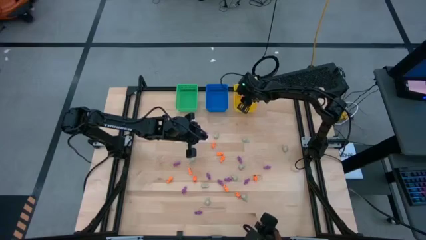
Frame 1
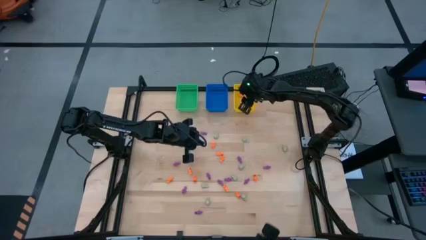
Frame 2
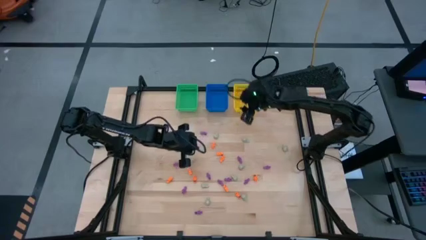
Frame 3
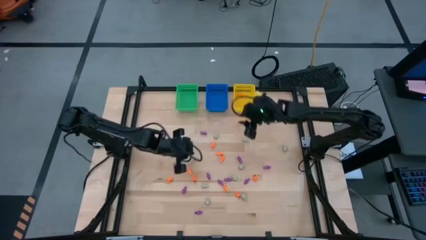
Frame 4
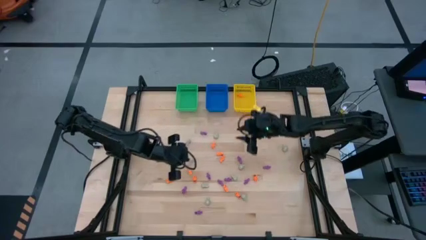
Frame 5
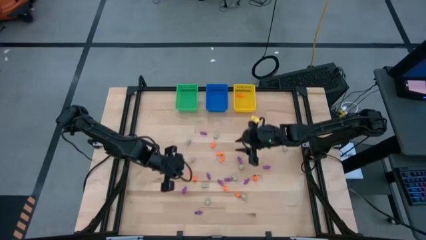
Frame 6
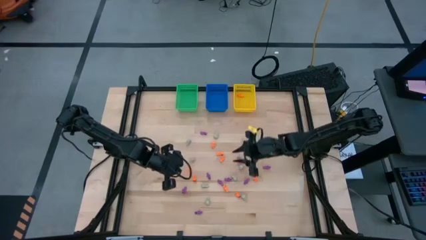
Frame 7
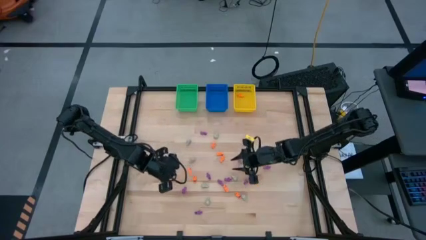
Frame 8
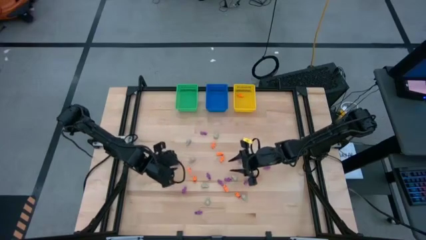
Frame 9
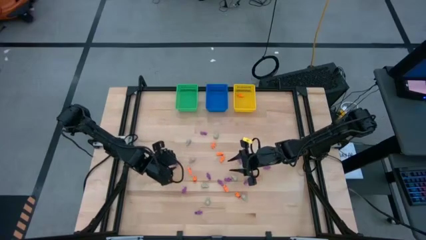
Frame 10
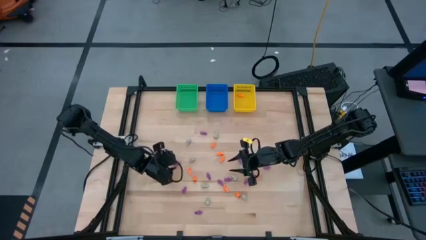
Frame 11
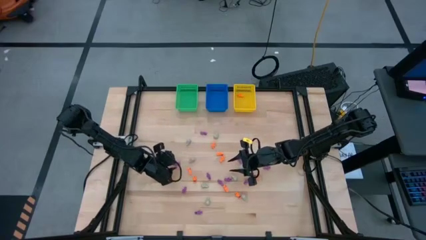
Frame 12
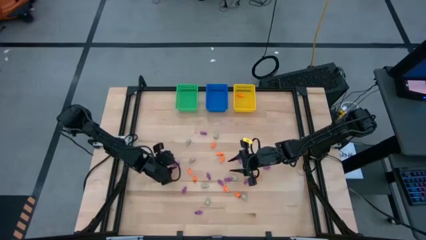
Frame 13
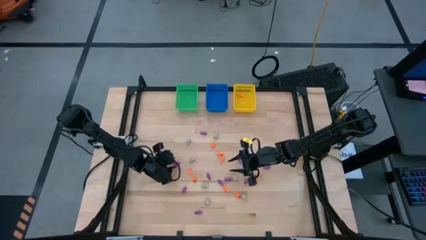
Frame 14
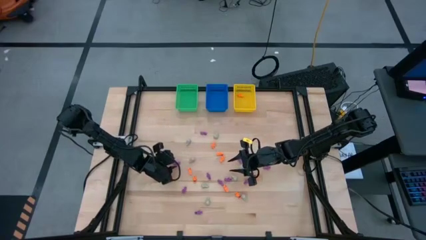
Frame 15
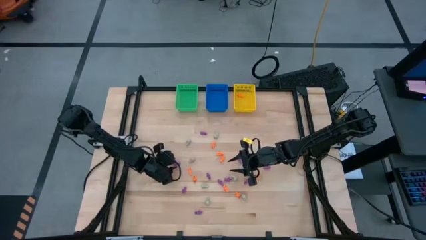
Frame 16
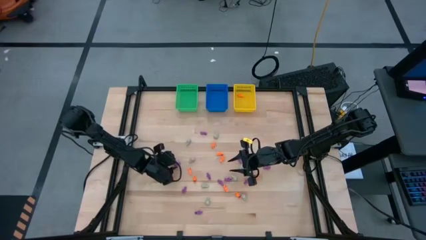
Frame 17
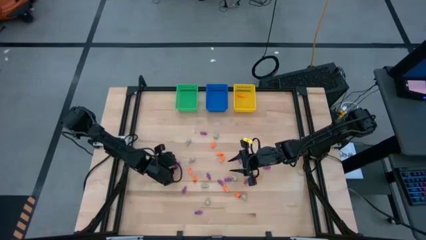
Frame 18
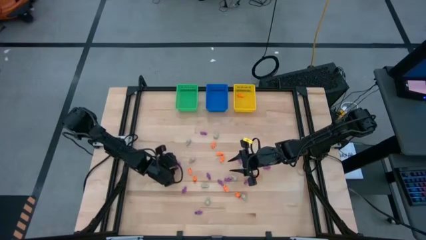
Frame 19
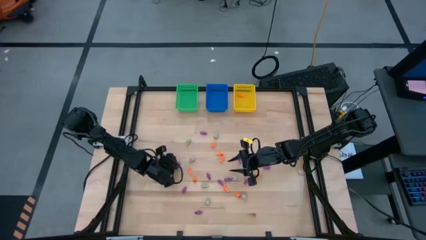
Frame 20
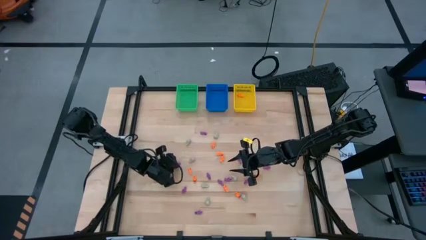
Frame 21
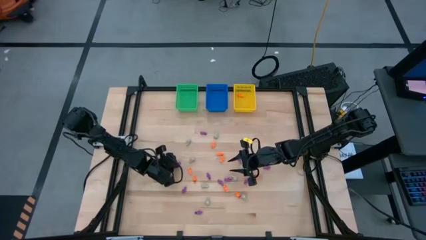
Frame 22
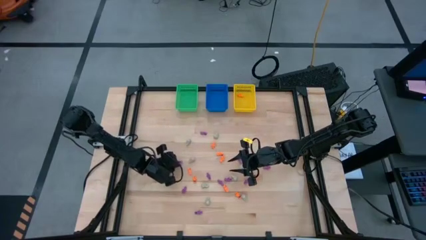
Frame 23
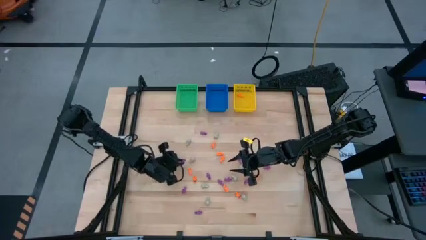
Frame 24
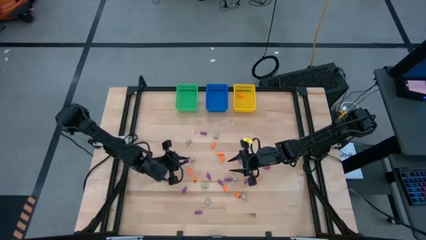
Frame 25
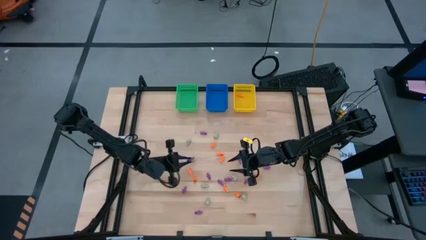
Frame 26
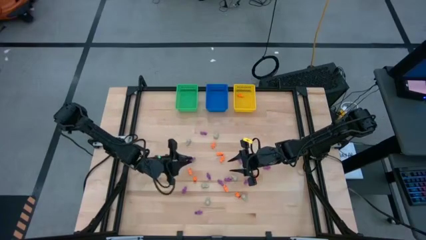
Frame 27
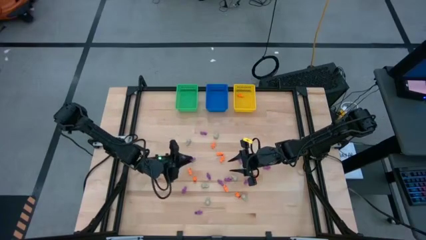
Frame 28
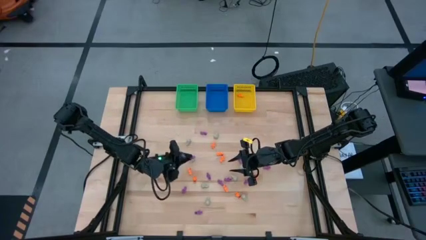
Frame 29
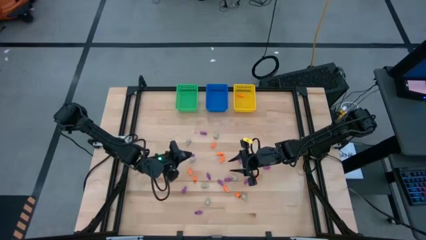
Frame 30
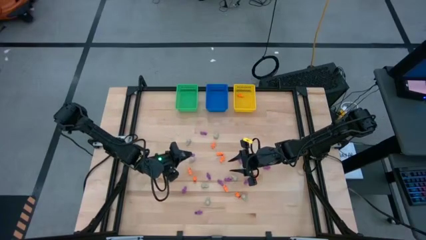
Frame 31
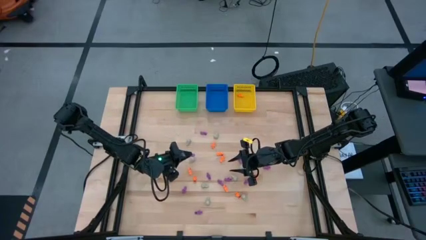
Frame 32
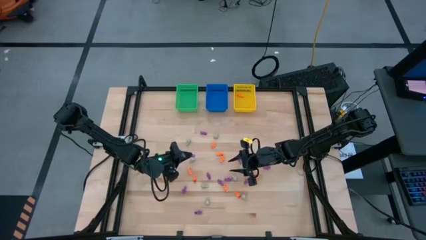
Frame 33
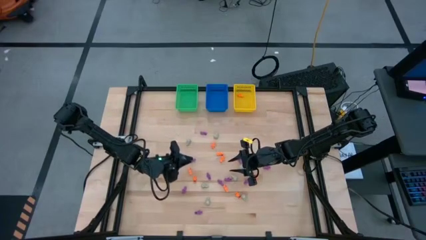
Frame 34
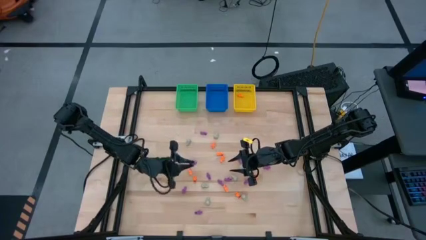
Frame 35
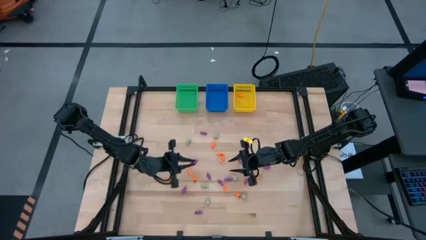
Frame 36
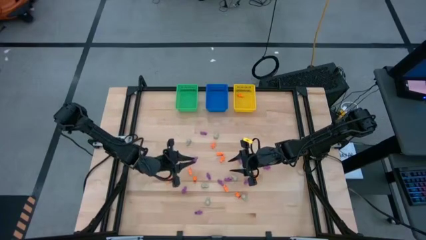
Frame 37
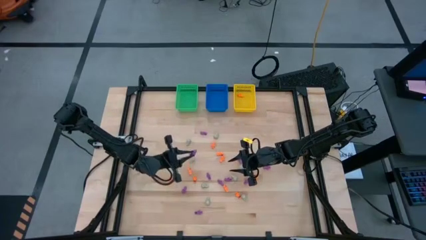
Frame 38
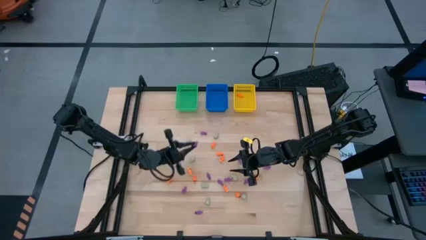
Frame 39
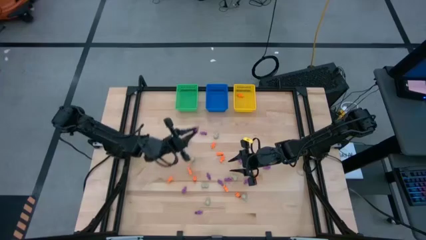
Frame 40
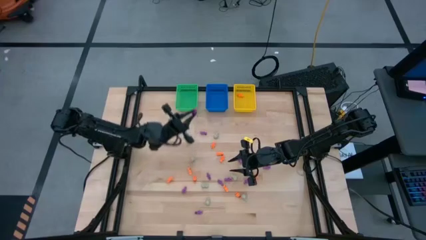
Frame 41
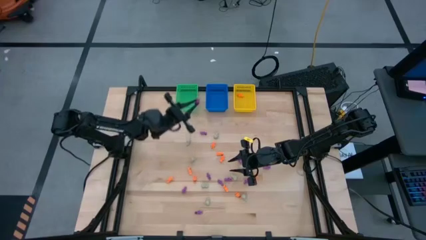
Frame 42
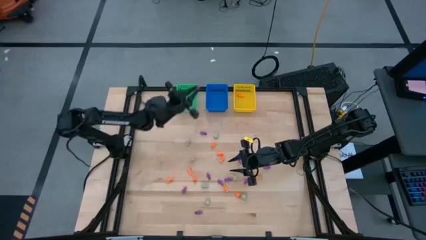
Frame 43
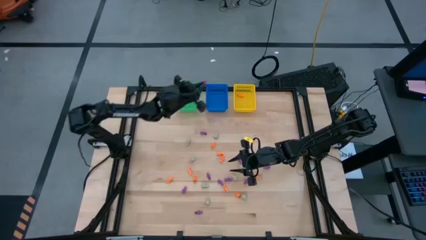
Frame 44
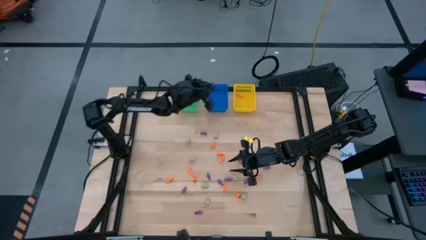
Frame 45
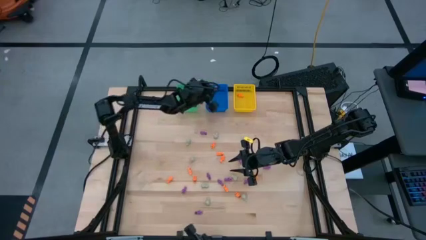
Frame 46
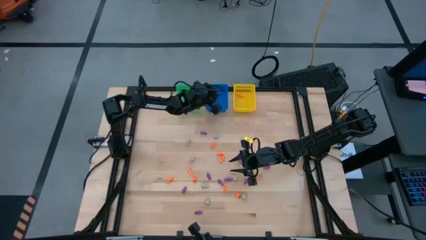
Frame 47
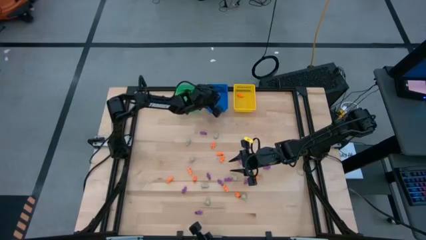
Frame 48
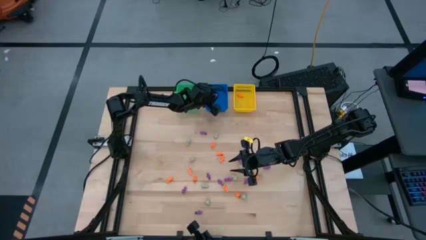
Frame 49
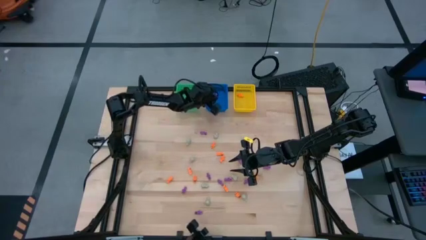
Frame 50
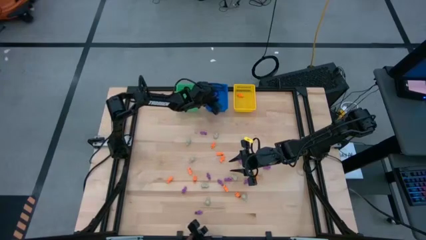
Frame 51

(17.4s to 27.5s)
Task: Sort Halloween decoration
Put the purple skeleton toy into the blue bin

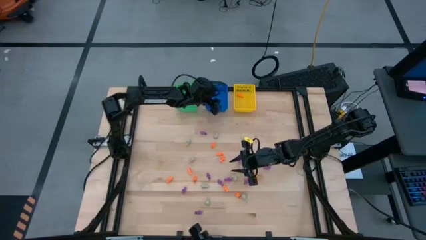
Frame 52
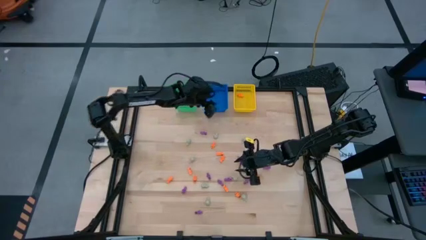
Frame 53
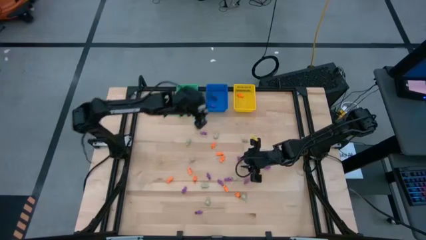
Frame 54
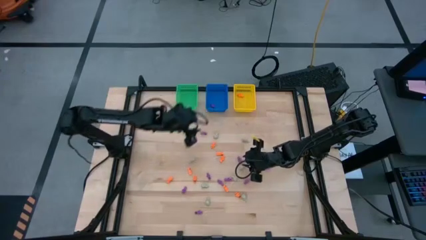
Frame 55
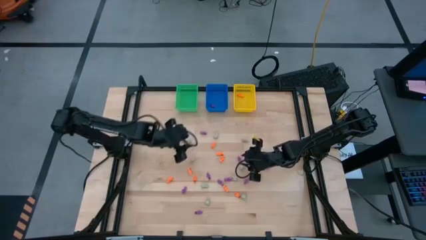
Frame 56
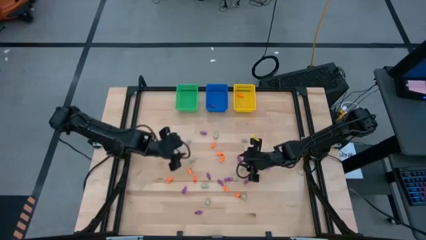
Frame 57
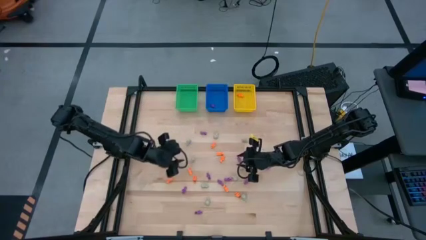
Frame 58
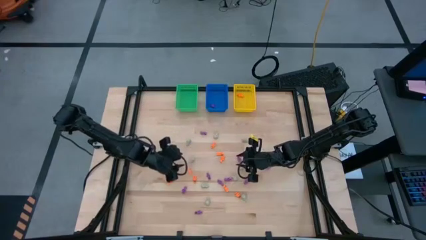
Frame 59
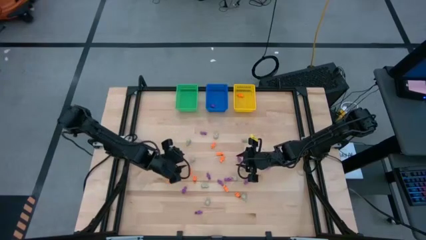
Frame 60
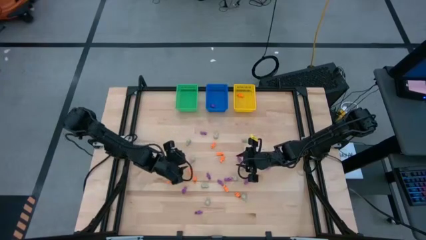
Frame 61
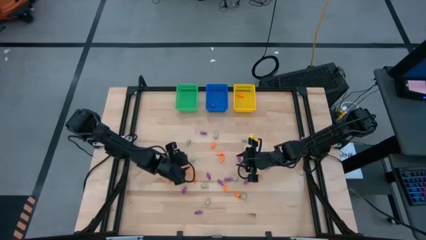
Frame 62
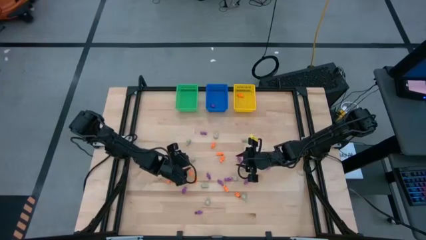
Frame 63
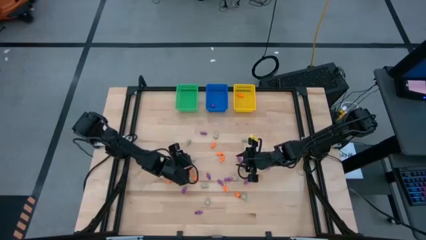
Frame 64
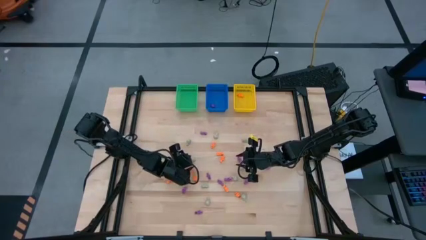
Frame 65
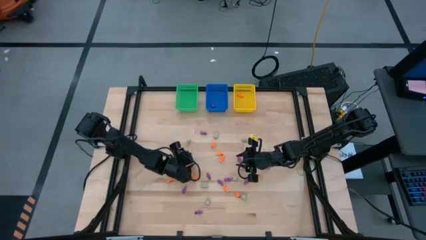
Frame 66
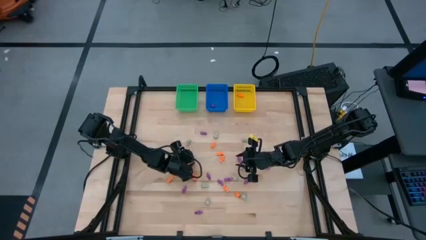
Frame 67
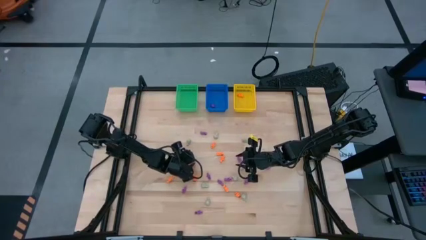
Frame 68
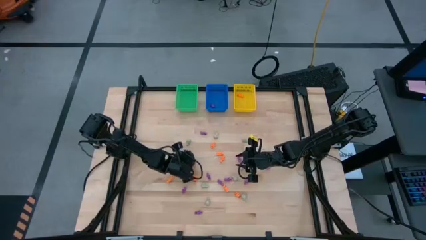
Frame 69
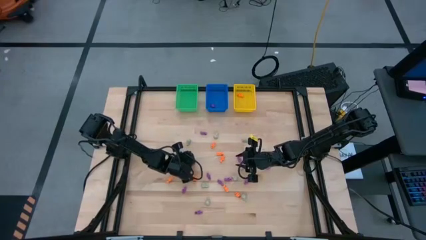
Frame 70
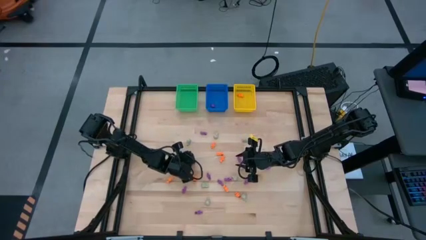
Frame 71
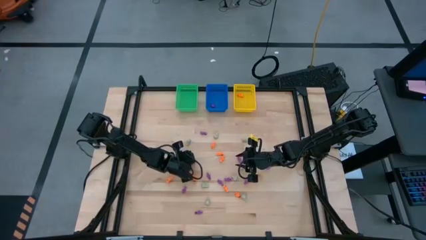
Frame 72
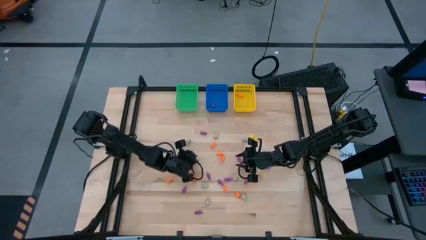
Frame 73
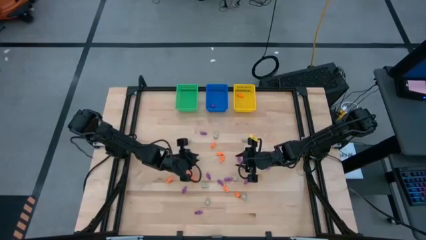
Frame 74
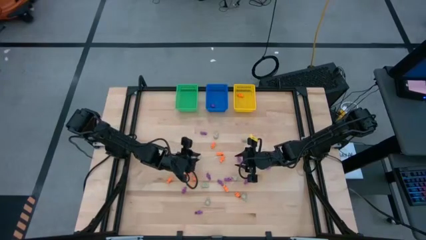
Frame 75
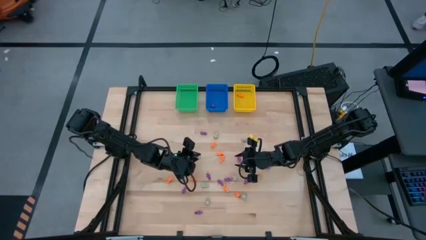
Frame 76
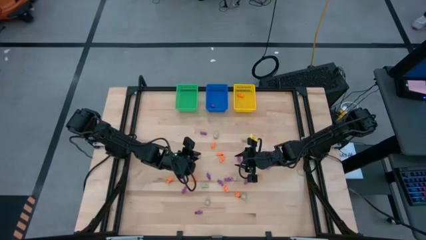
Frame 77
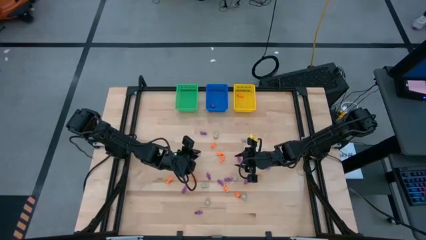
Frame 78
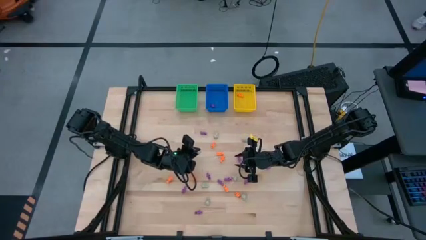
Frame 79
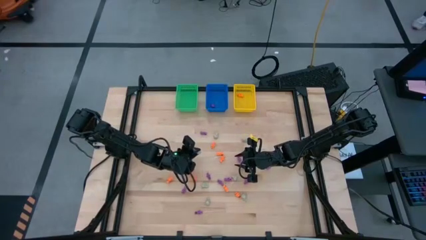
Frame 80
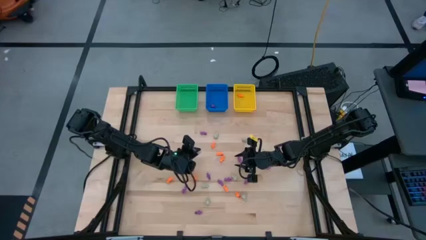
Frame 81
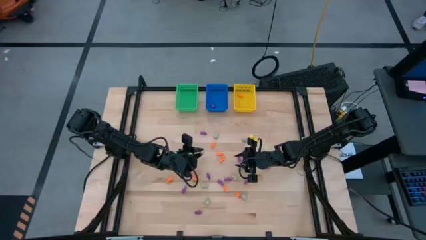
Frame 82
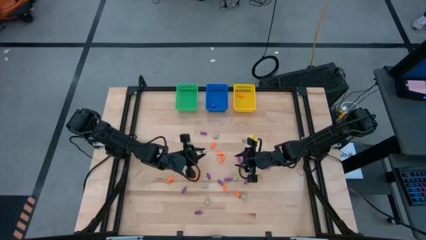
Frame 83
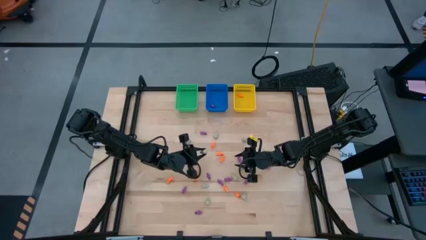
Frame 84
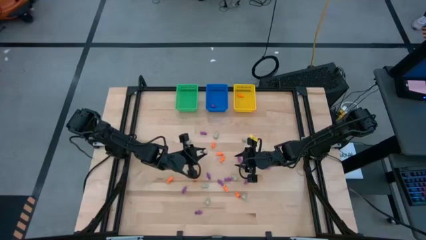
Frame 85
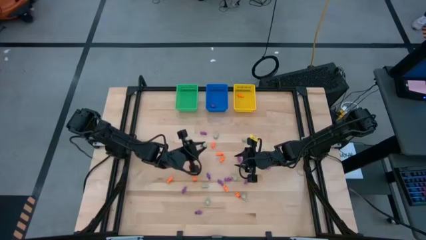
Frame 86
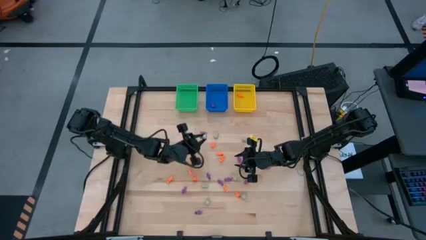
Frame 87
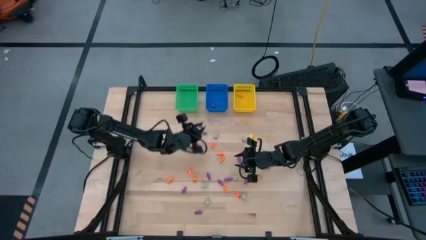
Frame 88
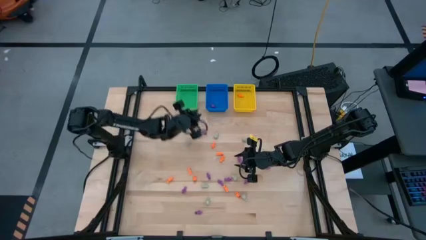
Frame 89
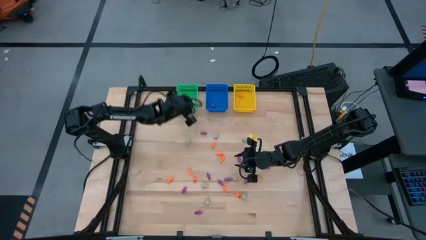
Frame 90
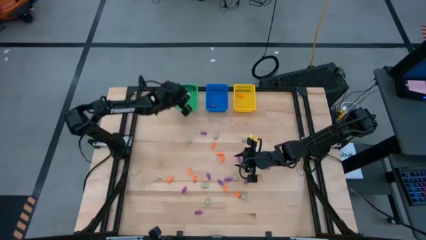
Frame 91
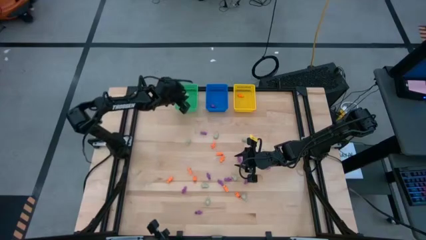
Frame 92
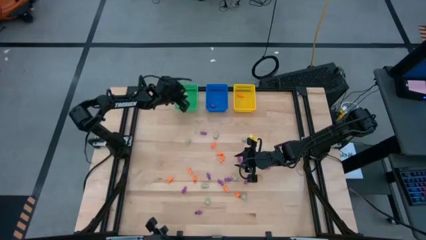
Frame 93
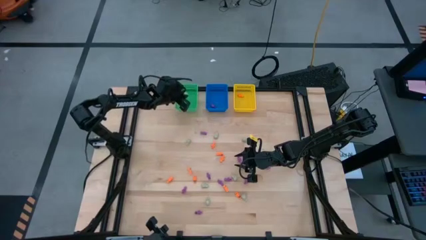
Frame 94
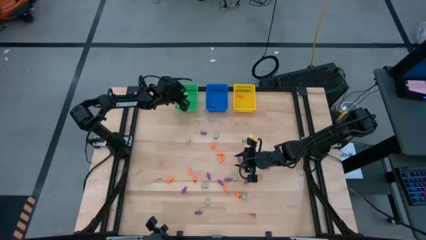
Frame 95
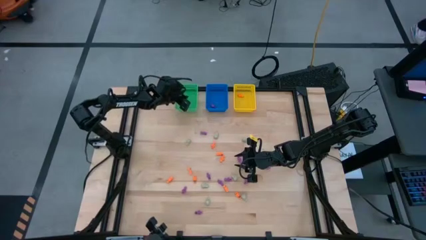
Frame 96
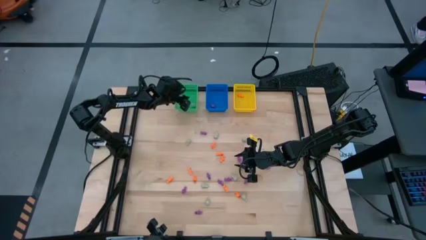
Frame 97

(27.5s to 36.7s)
Put the gray skull toy into the green bin
